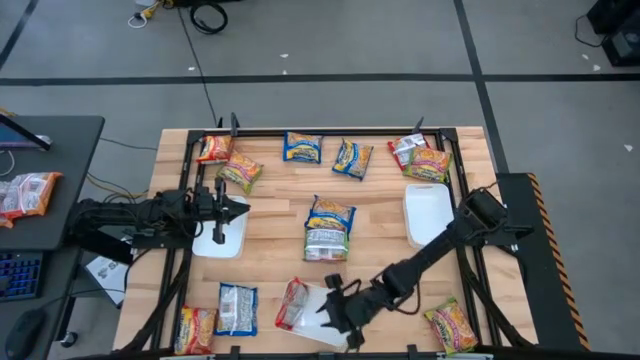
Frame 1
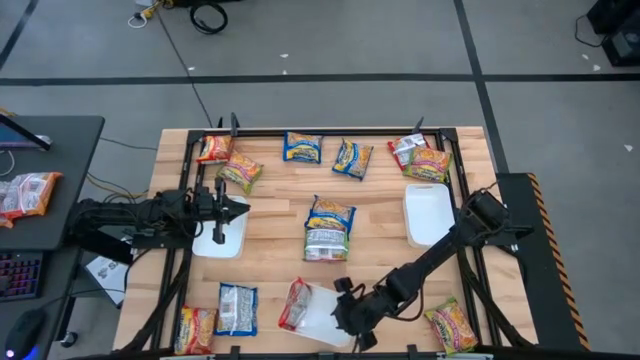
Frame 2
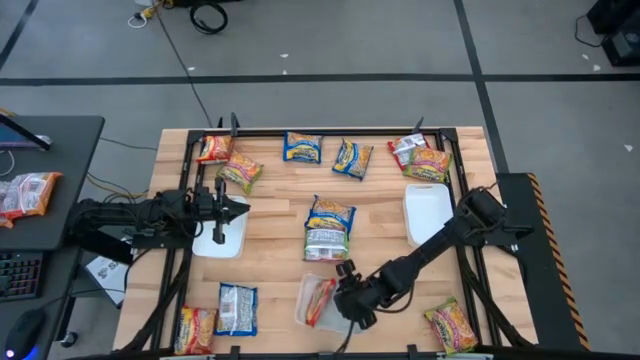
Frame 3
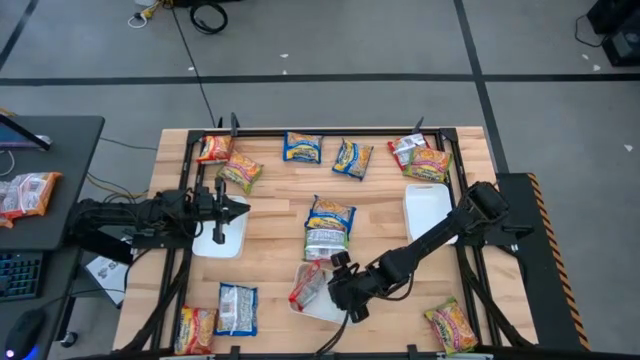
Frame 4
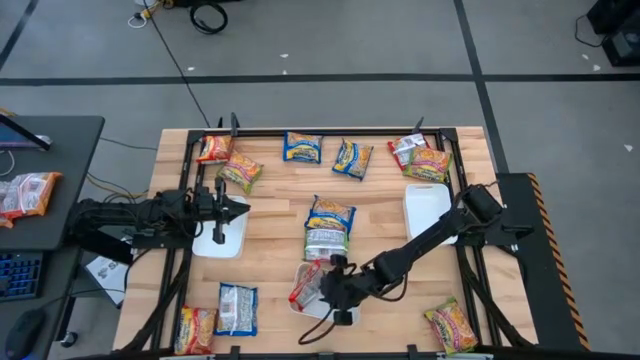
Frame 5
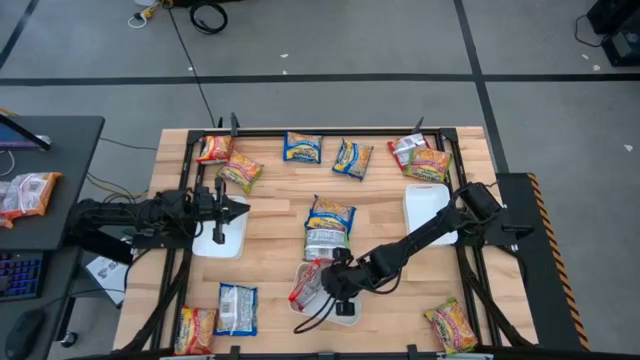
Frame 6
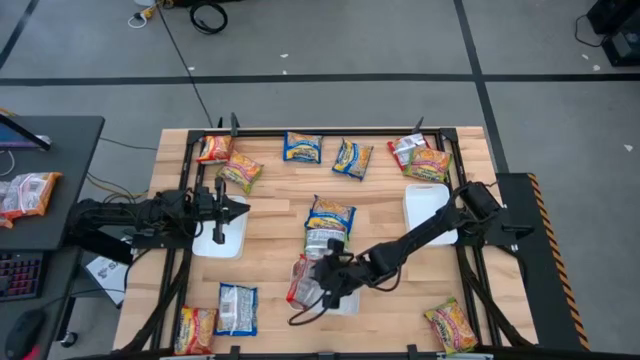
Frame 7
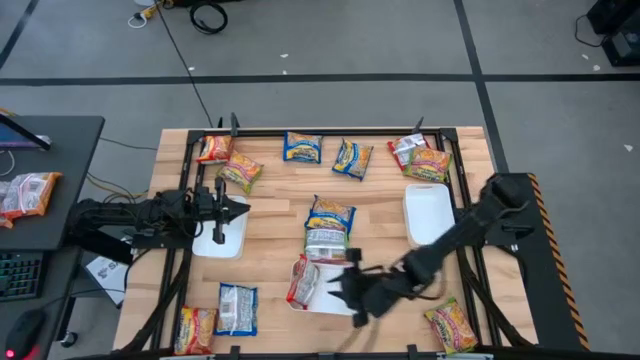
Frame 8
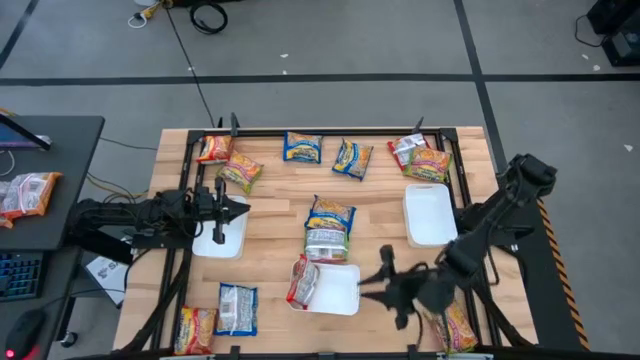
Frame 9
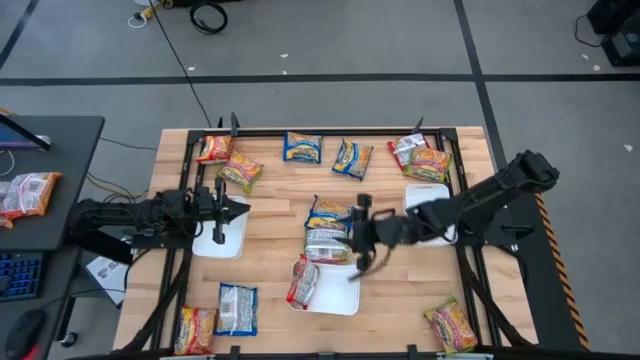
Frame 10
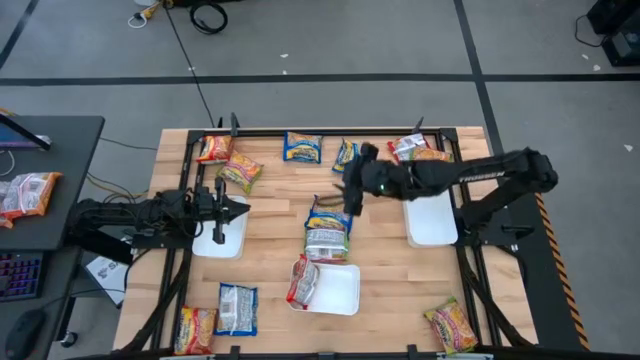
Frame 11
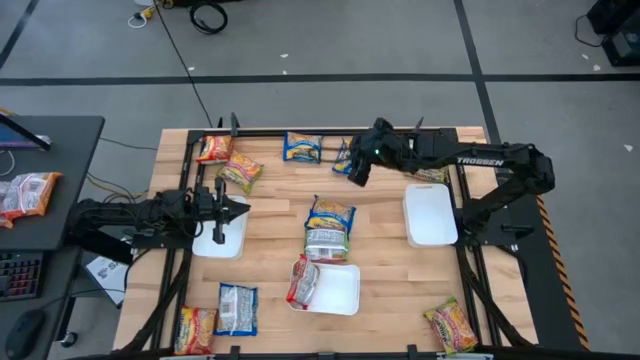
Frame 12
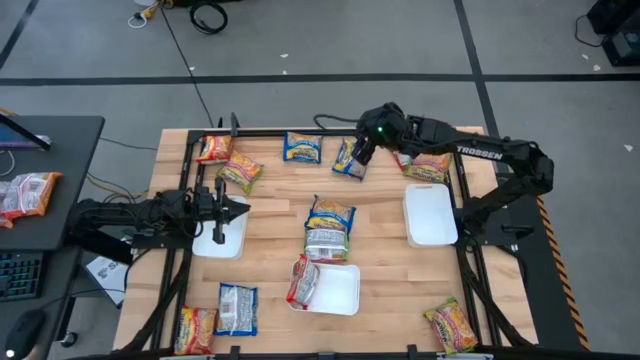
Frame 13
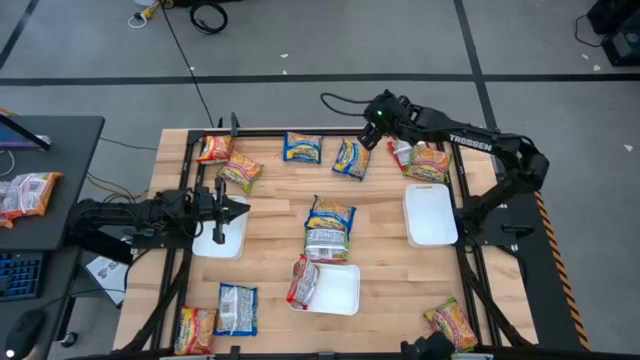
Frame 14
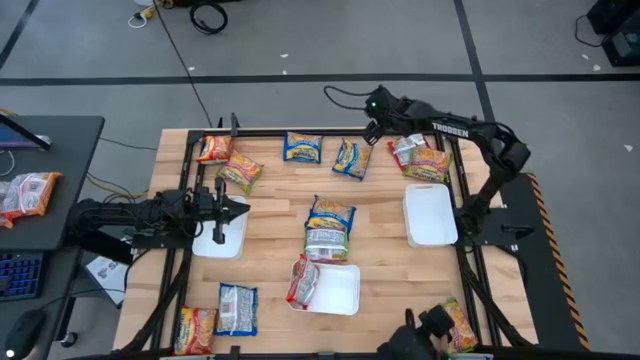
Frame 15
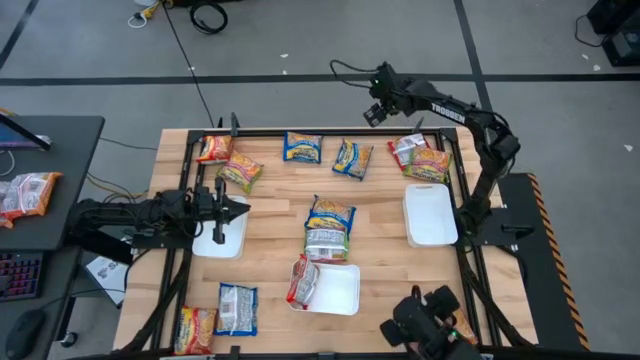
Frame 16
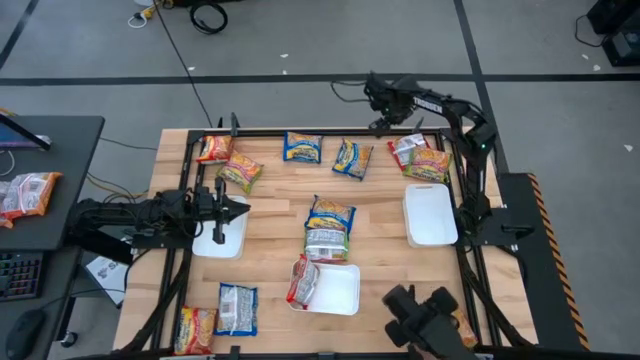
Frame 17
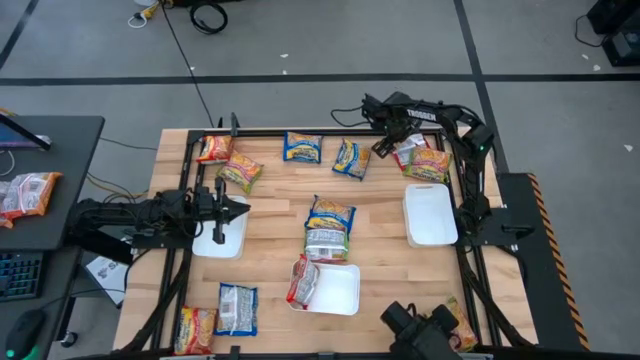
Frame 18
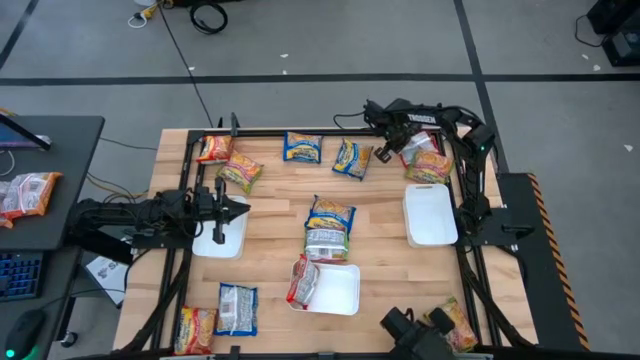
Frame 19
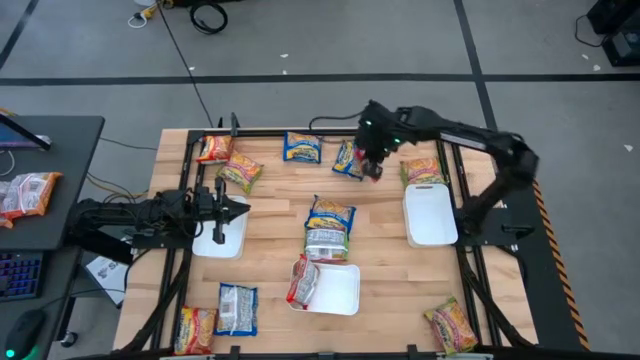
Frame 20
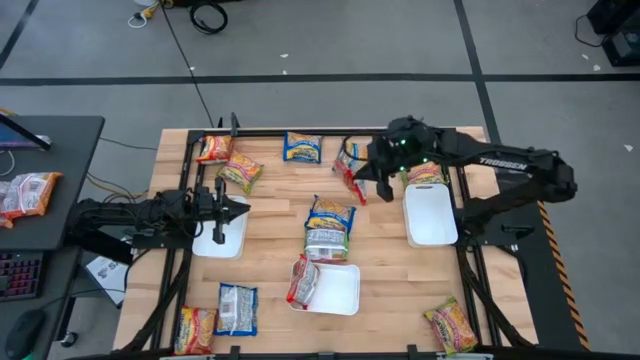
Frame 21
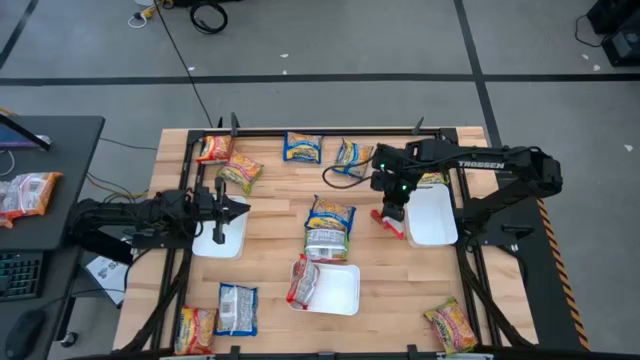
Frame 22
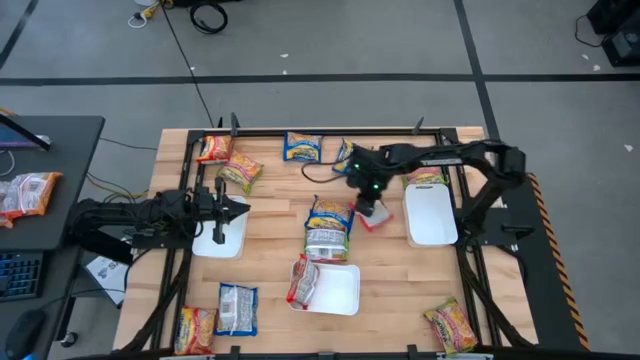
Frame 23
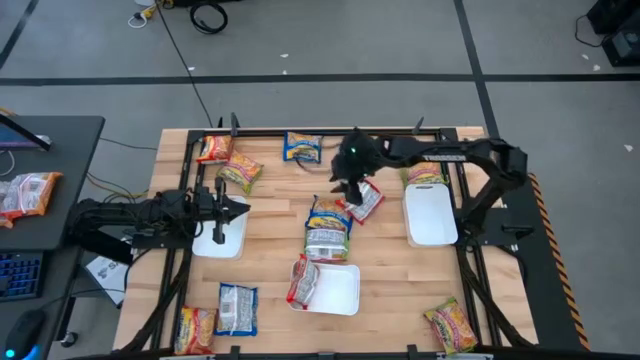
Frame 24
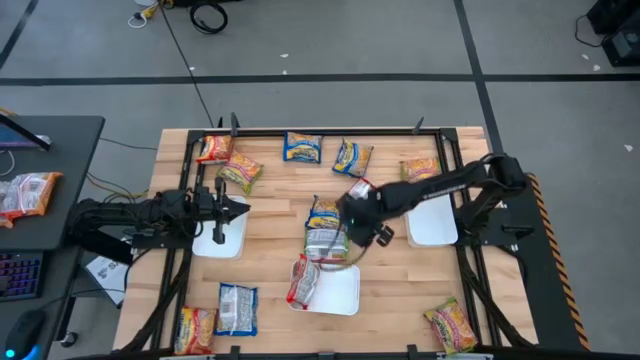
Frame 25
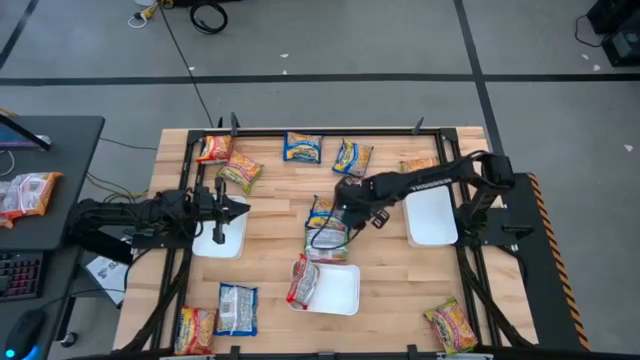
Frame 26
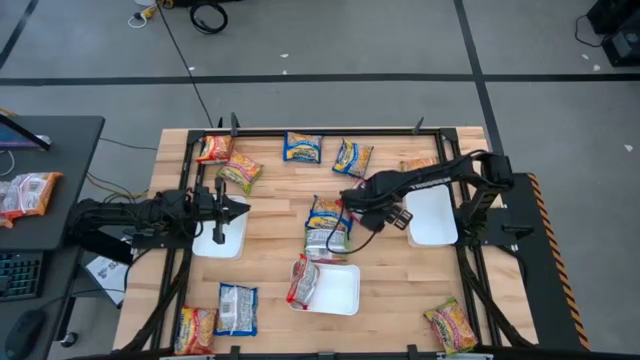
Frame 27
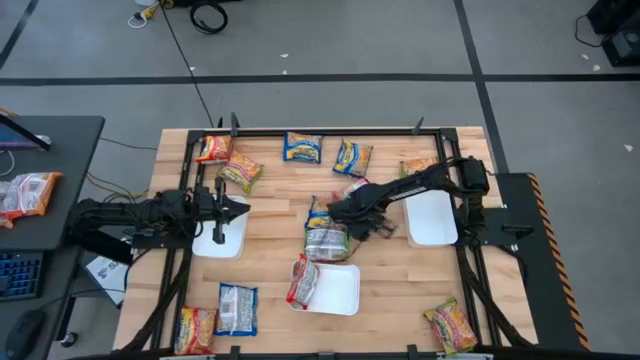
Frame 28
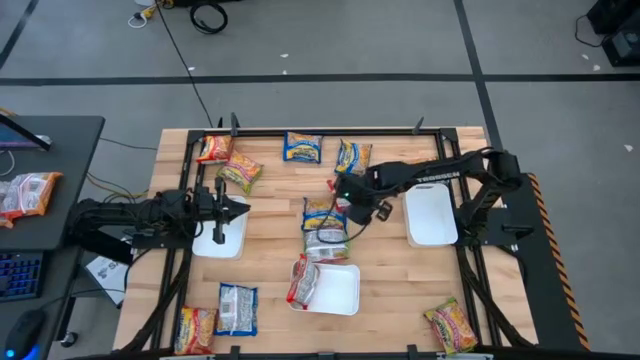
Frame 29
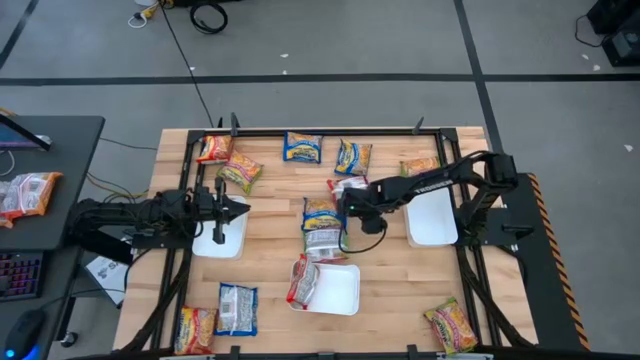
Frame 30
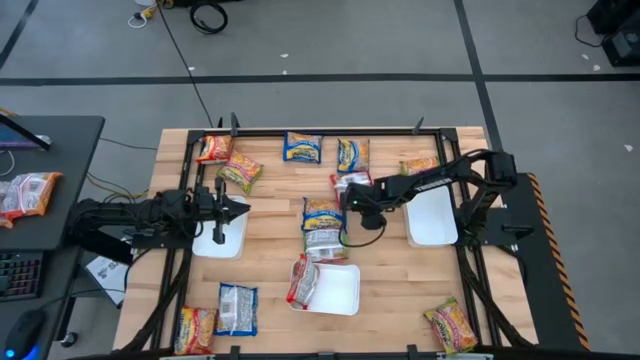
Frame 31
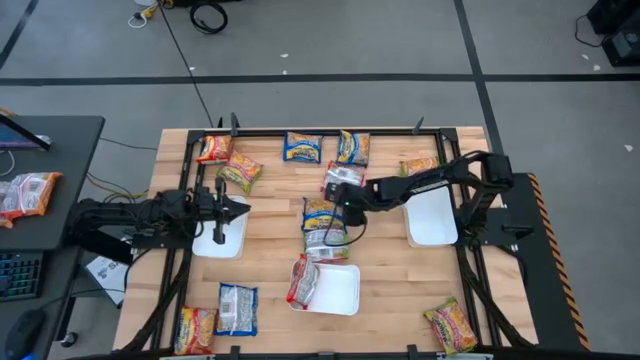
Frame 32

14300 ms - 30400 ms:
Task: Sort Maruchan noodles
Put the top right red noodle pack into the bottom white bin
